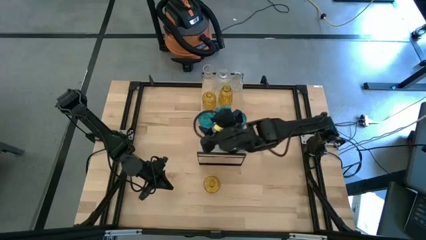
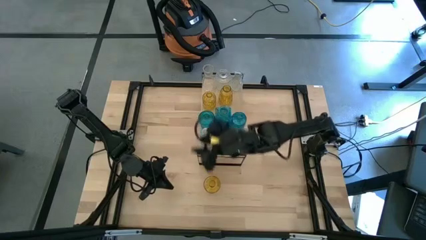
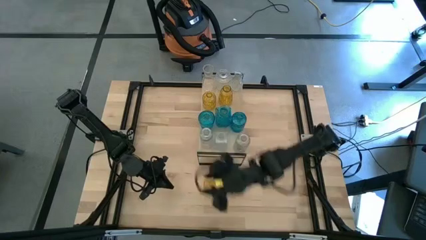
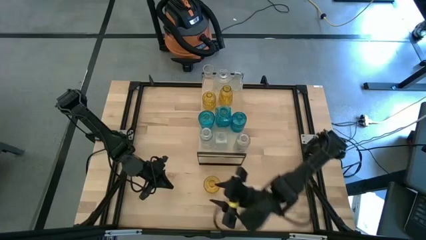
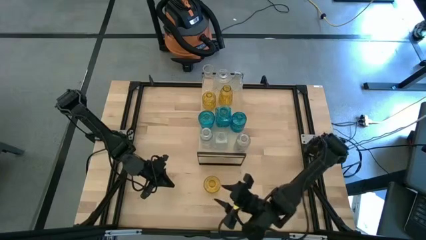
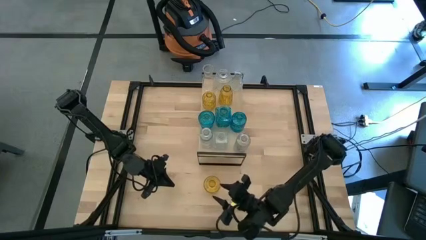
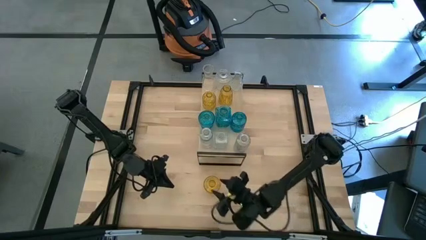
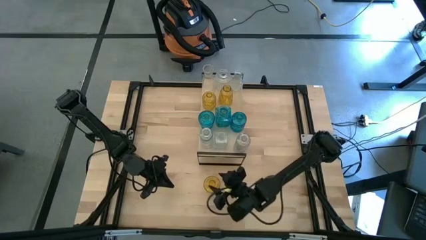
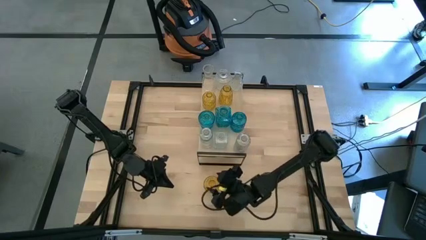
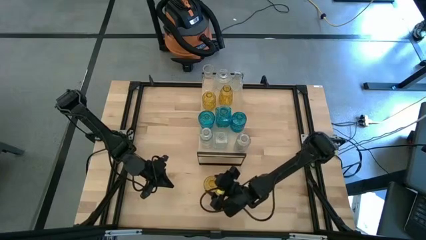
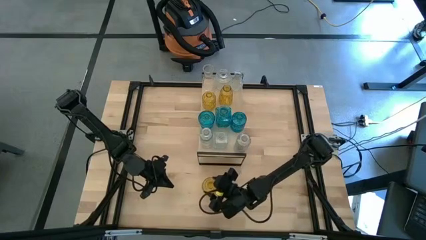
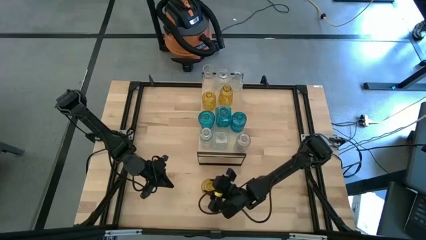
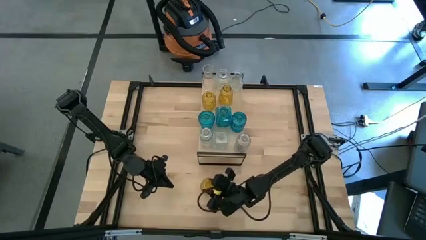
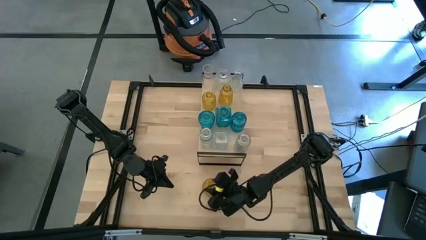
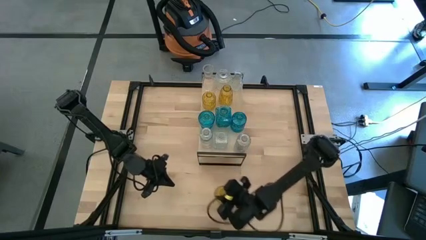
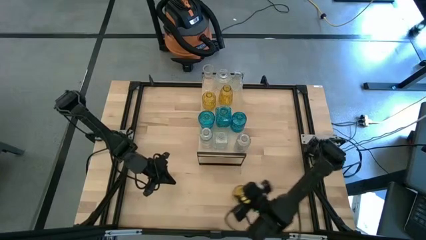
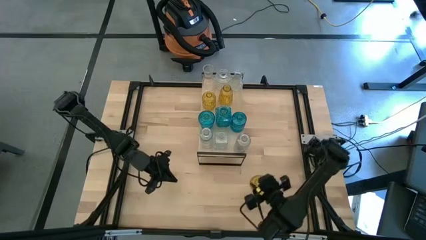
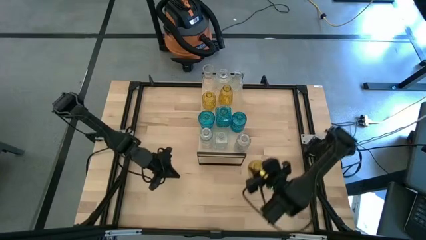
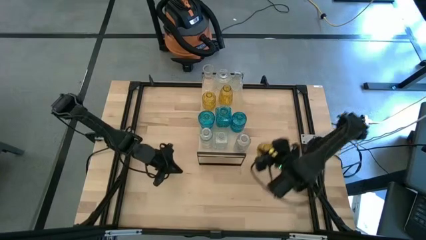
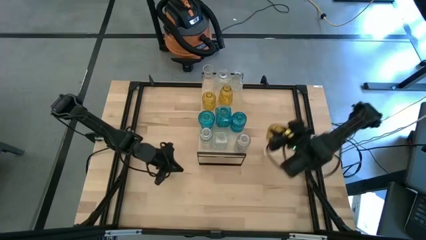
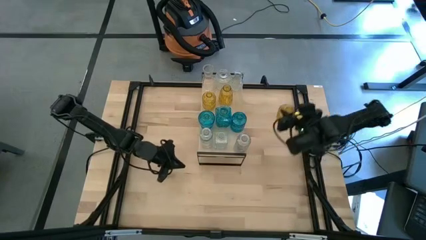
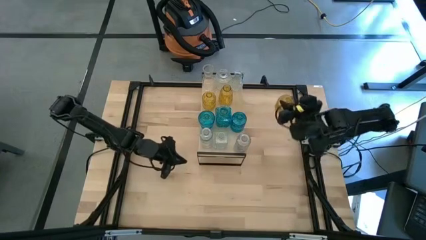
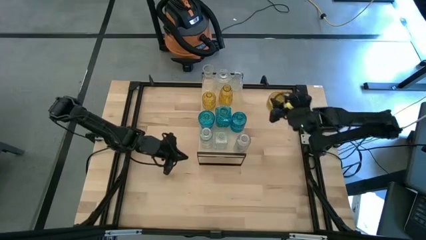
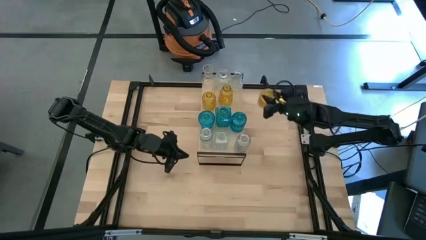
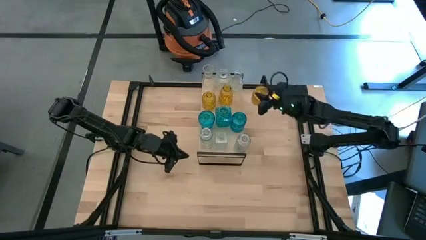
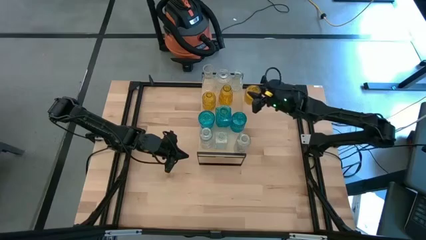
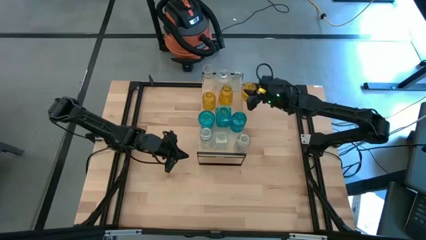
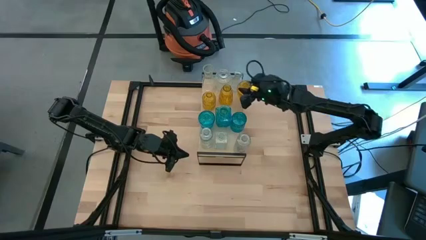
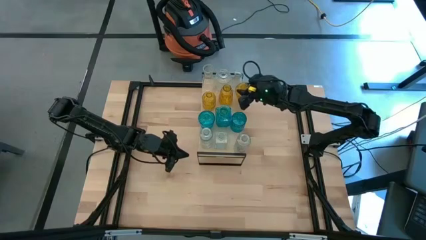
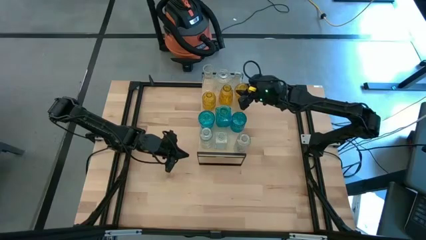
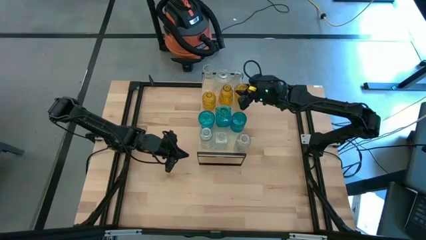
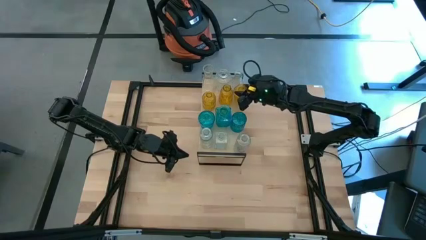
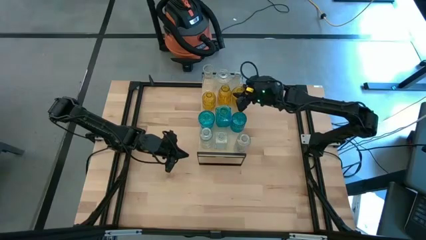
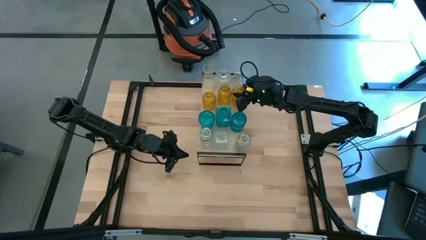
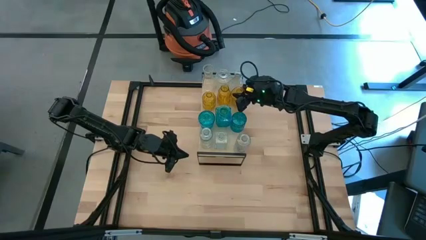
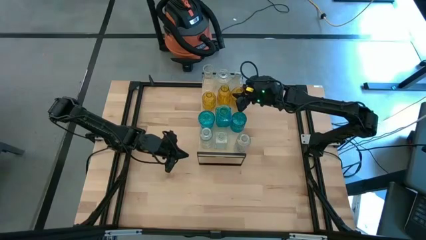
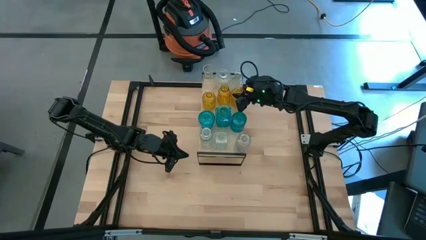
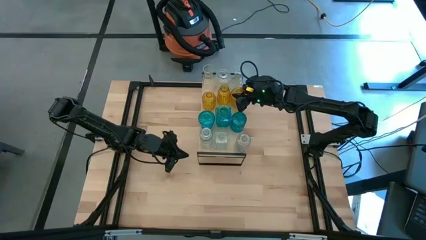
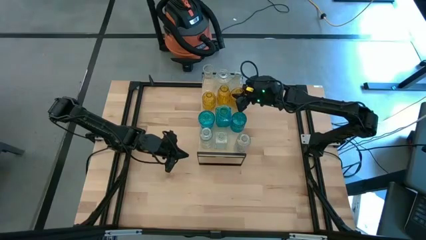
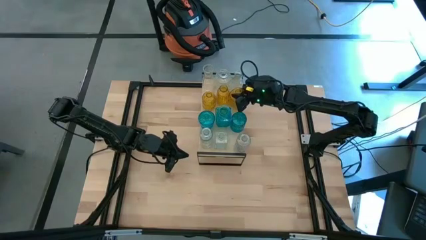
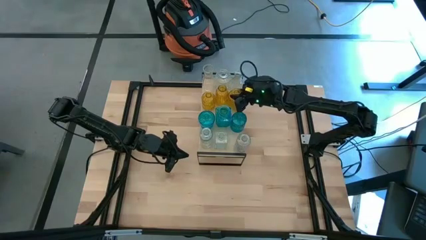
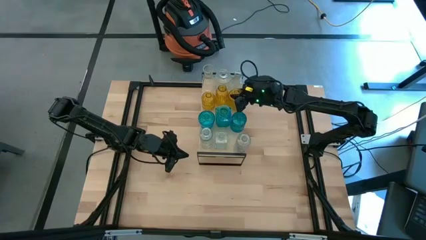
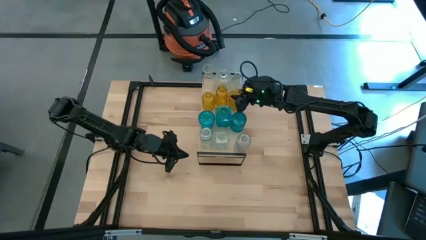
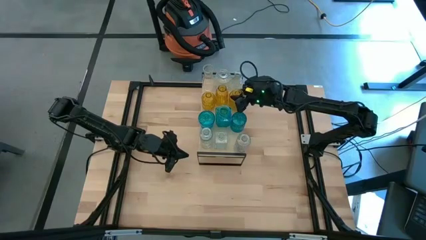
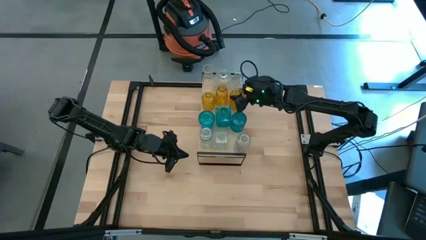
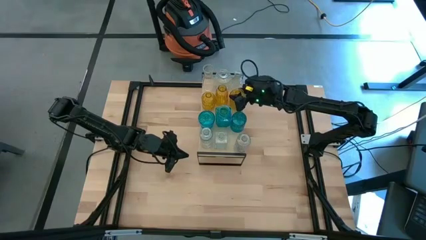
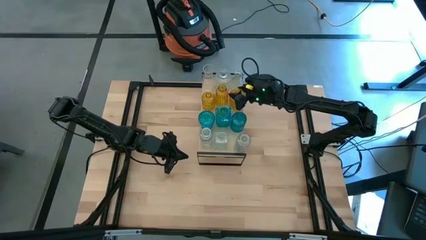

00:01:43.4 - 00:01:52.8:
Task: sort vases onto shelf
Put the yellow vase on the shelf aligned with the other yellow vases

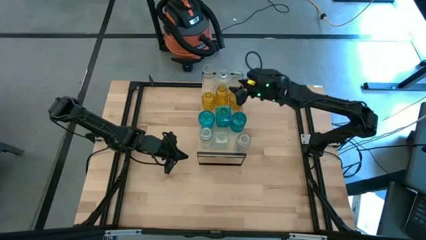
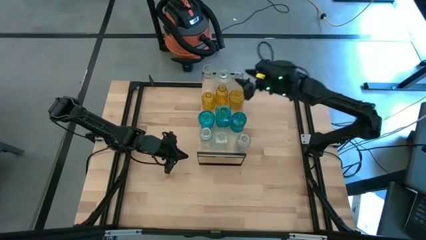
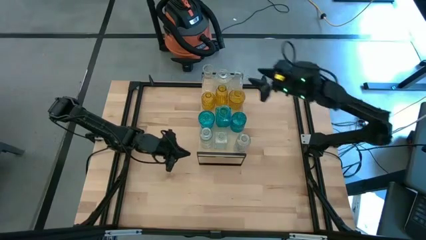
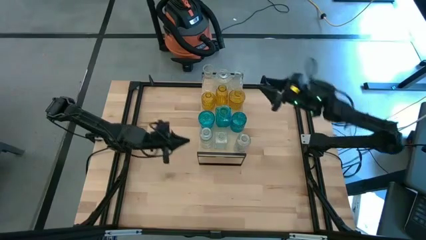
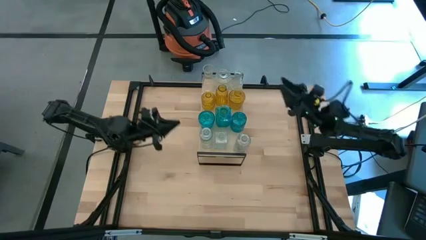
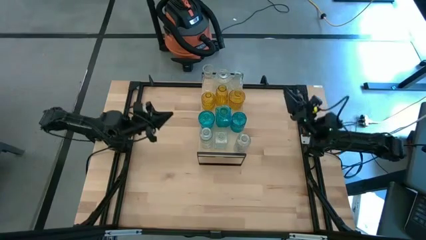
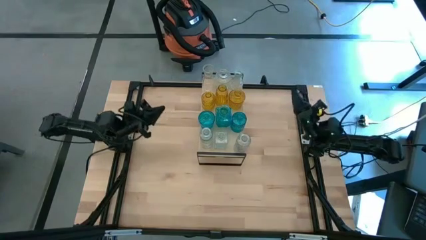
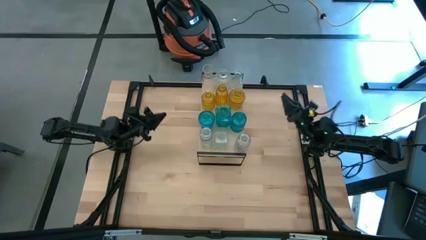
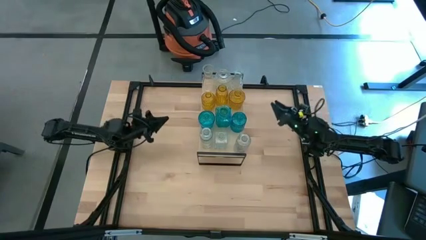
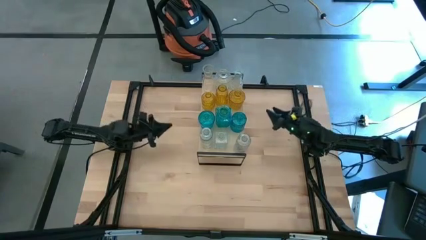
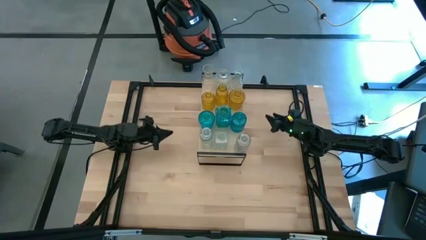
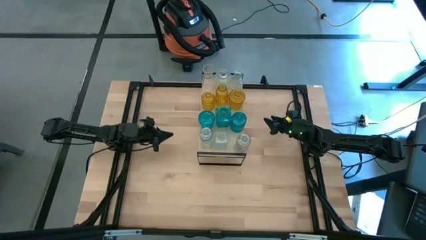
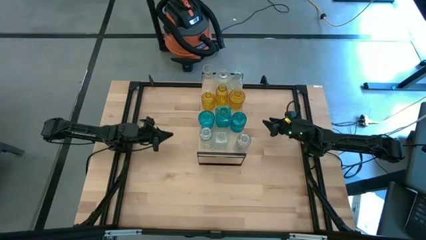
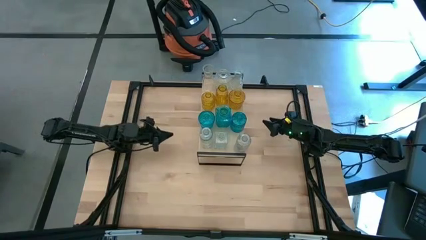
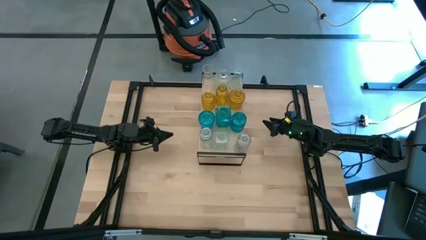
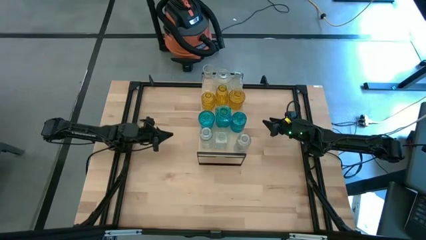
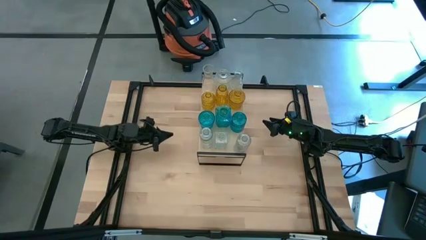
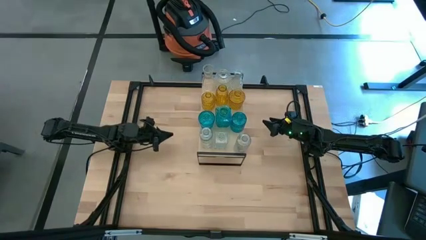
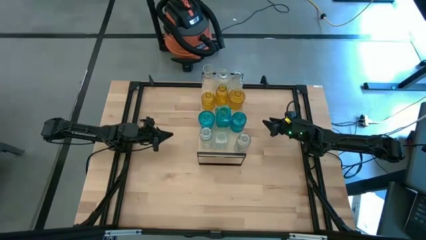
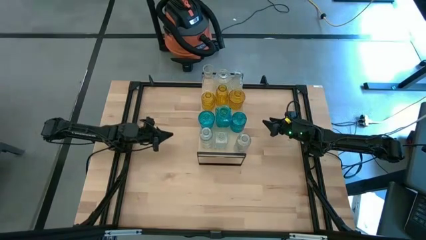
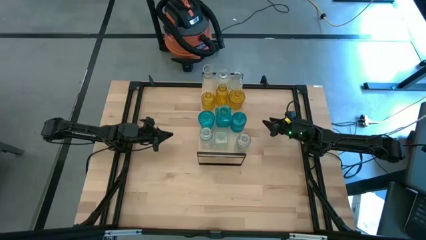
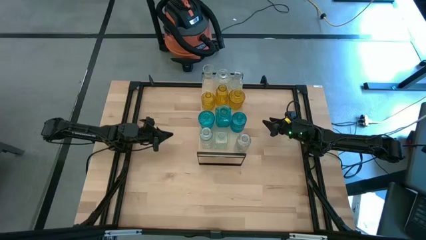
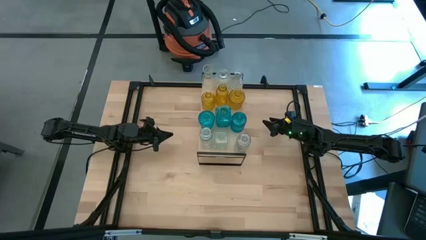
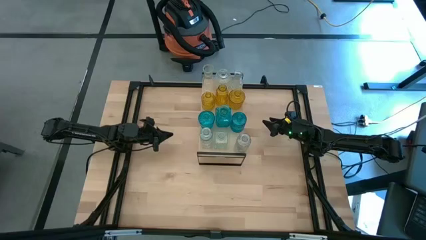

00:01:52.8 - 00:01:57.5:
Return to Home Position

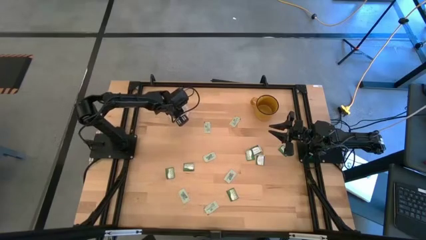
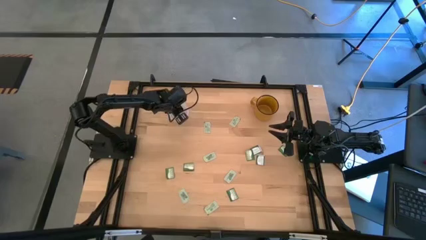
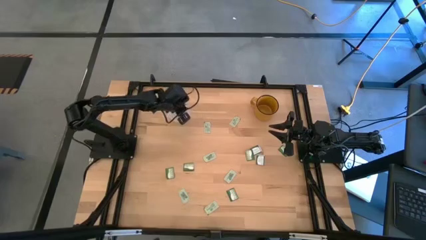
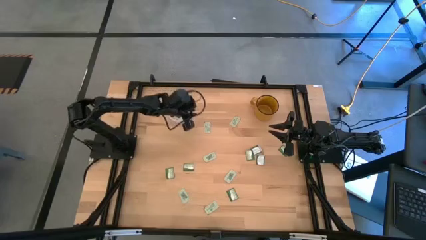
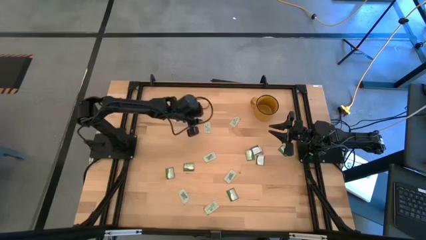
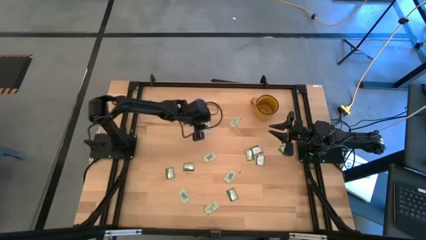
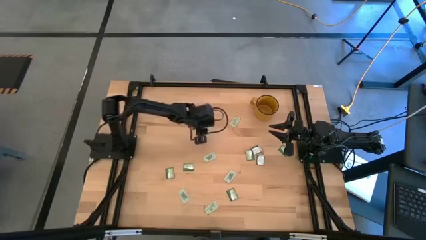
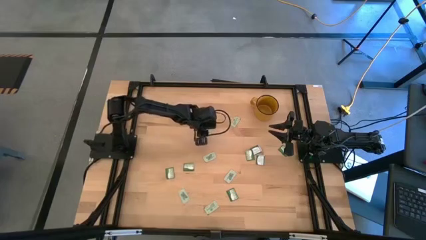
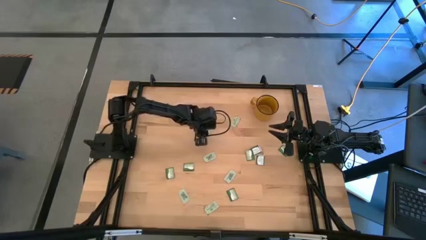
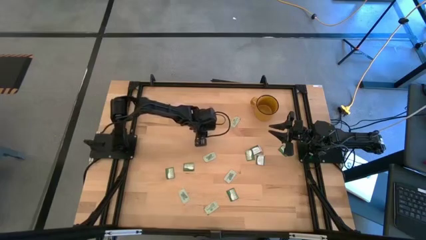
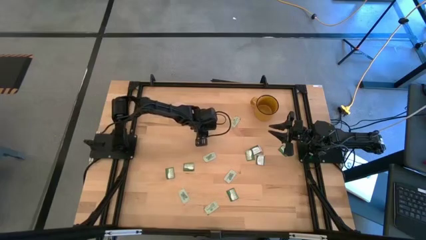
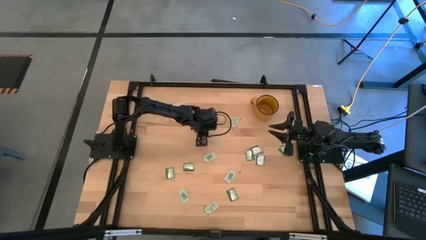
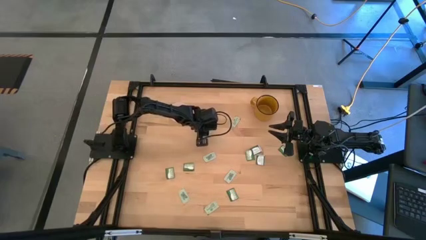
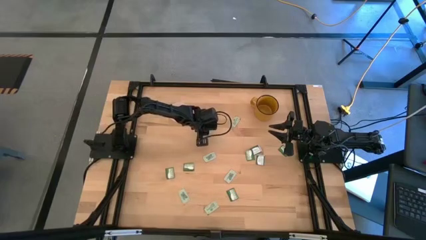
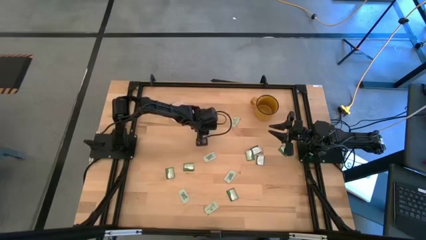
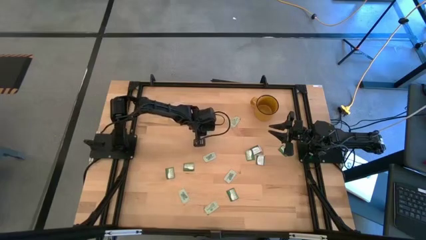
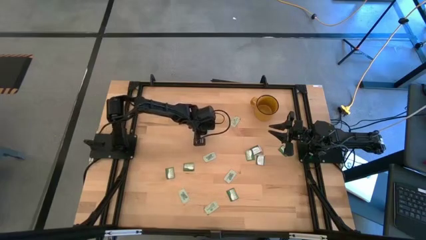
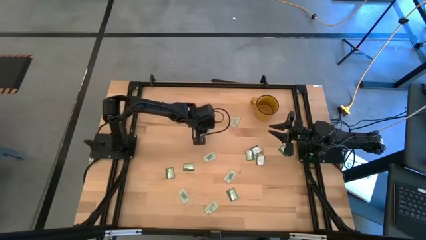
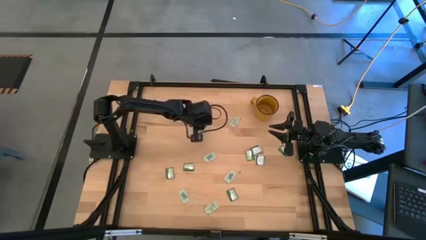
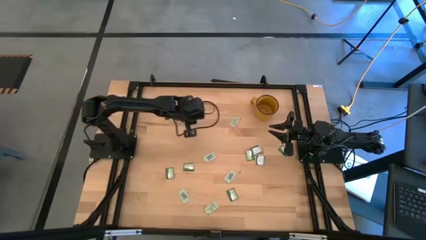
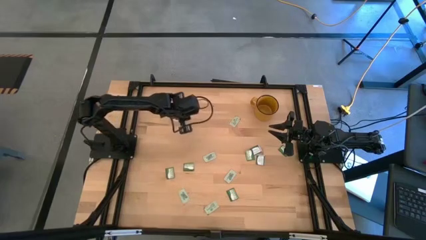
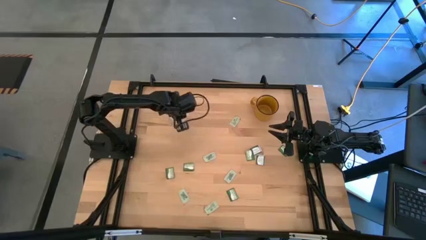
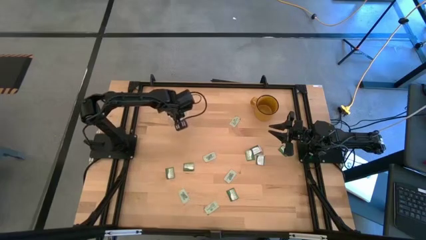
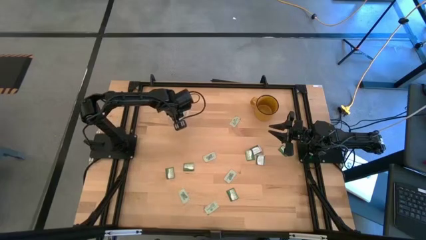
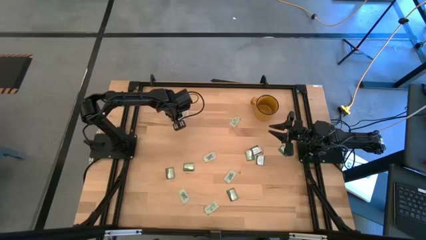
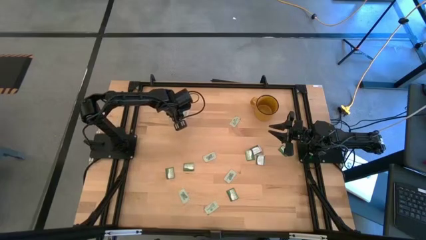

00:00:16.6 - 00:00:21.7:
Task: Pick and place Stevia / Truvia into bins
Put the stevia packet into the transparent container
